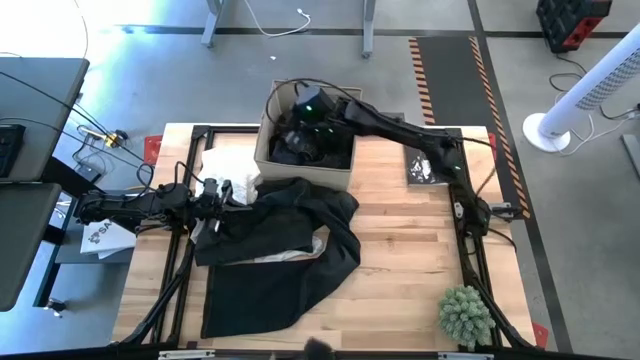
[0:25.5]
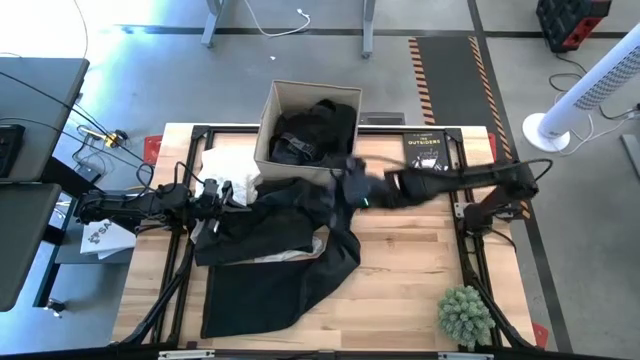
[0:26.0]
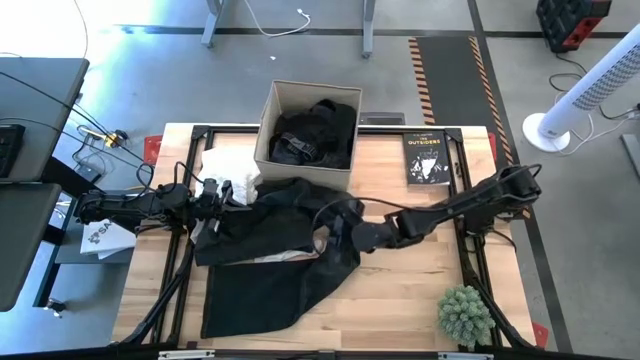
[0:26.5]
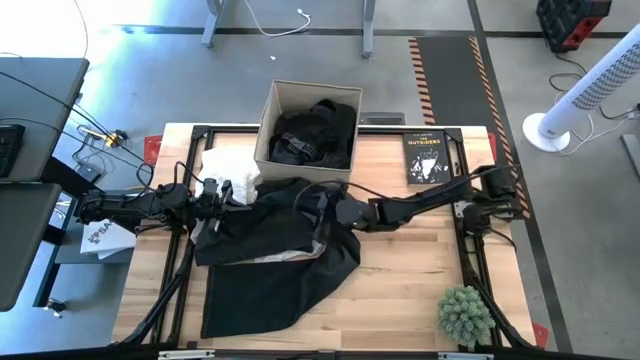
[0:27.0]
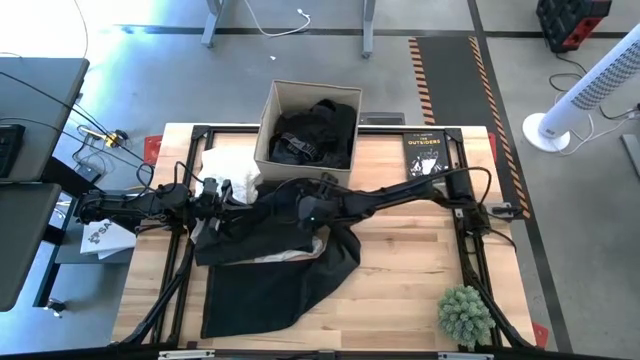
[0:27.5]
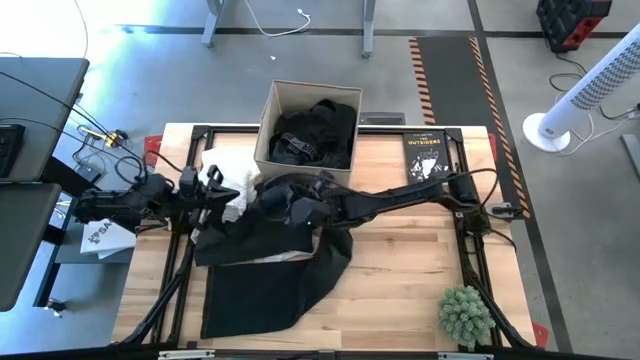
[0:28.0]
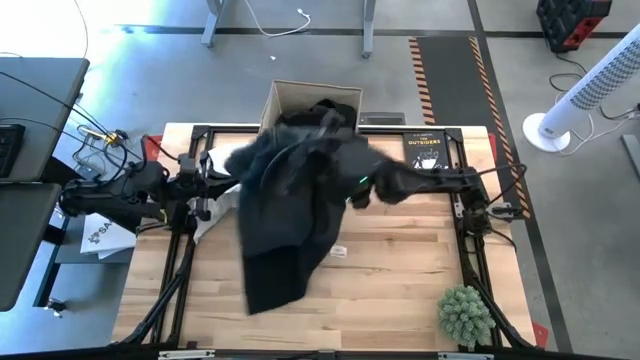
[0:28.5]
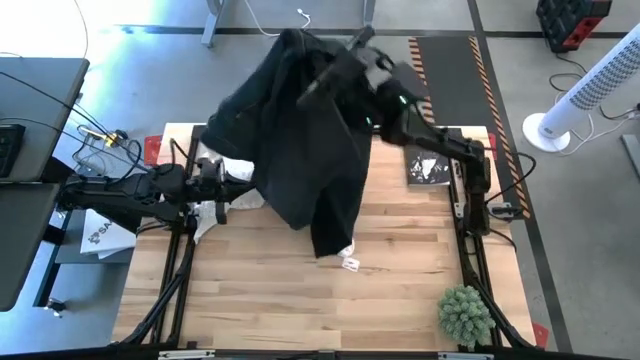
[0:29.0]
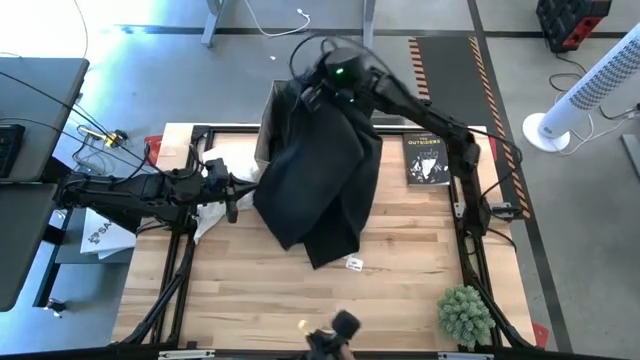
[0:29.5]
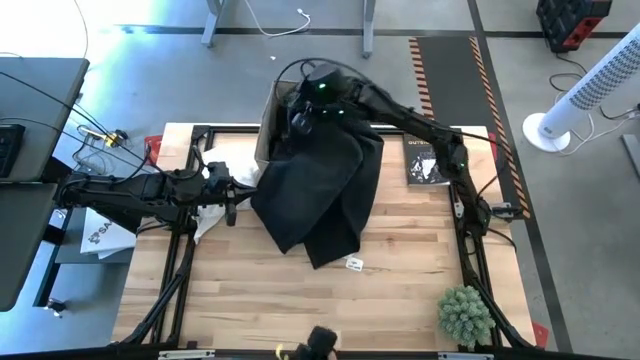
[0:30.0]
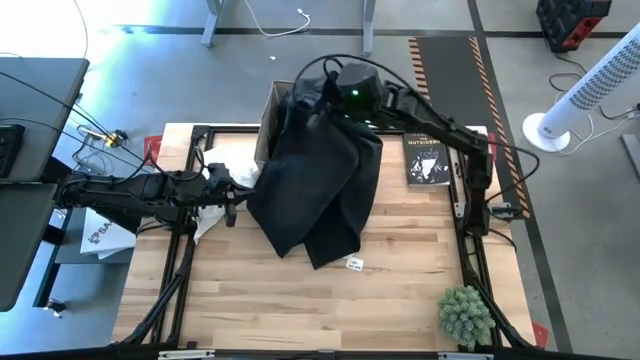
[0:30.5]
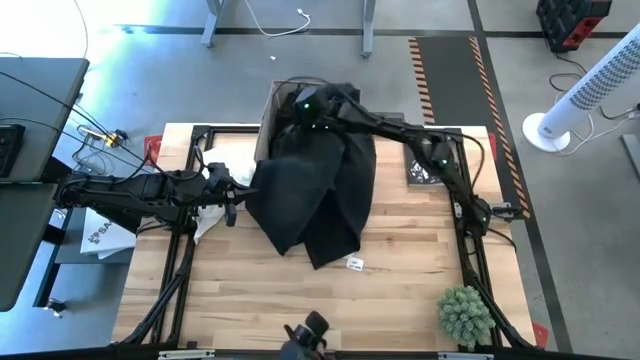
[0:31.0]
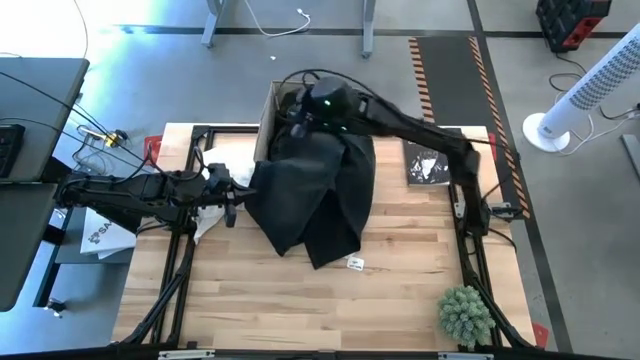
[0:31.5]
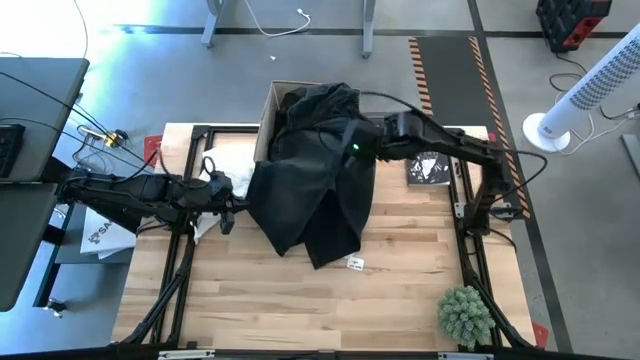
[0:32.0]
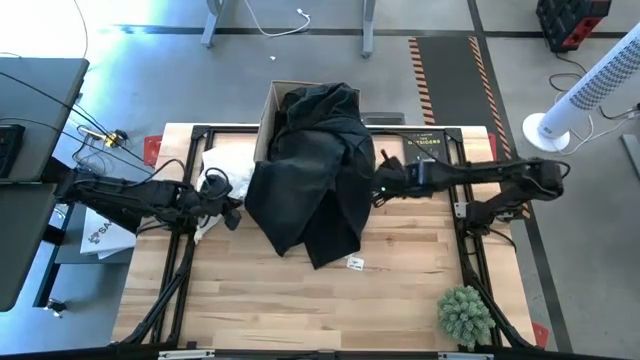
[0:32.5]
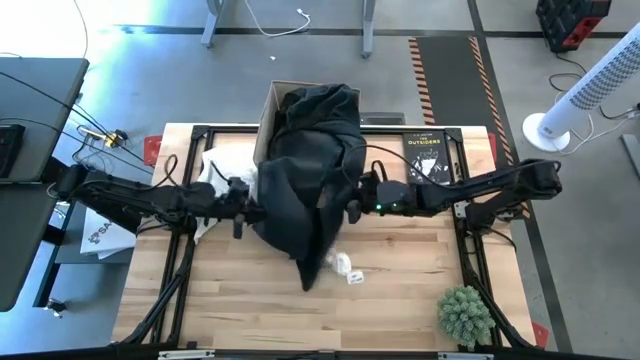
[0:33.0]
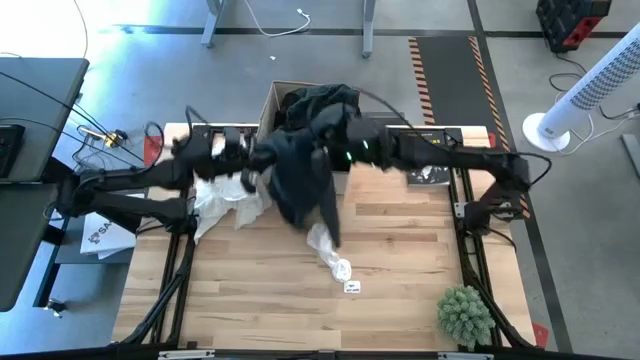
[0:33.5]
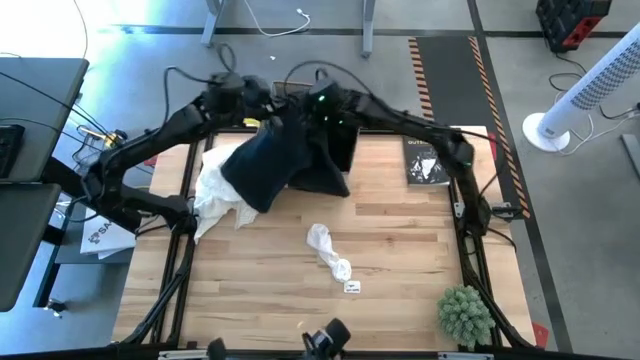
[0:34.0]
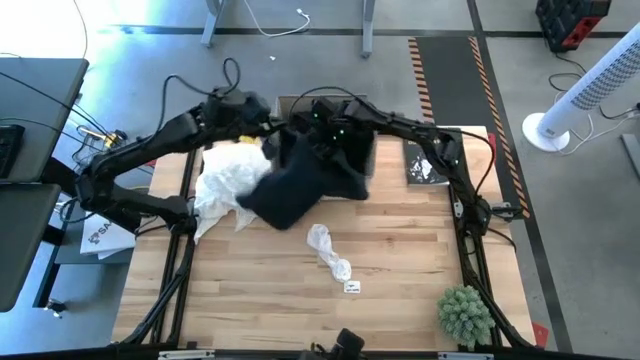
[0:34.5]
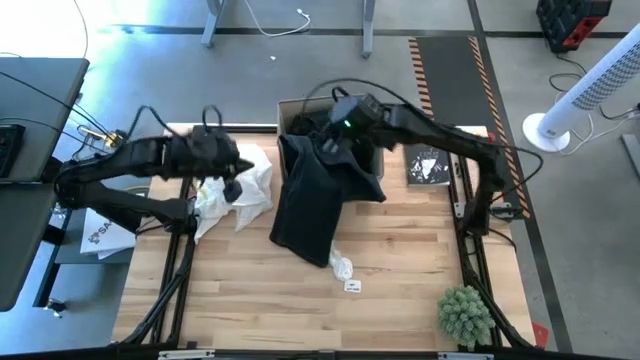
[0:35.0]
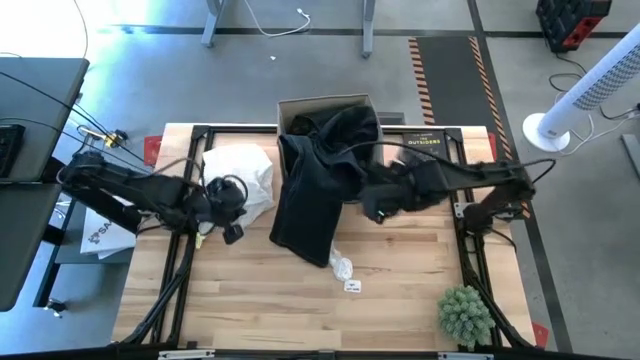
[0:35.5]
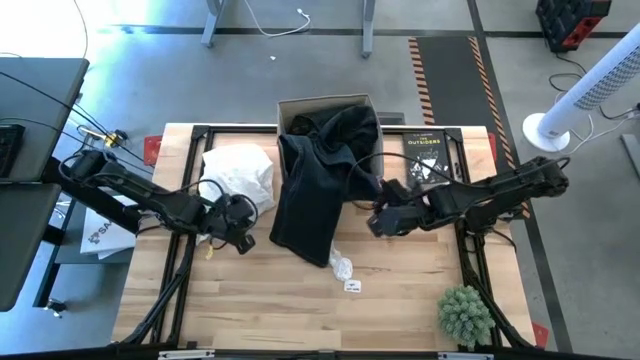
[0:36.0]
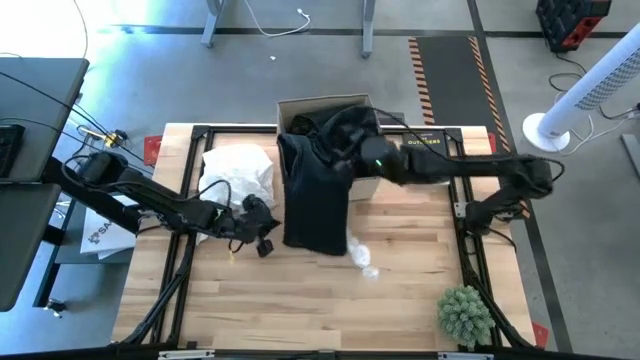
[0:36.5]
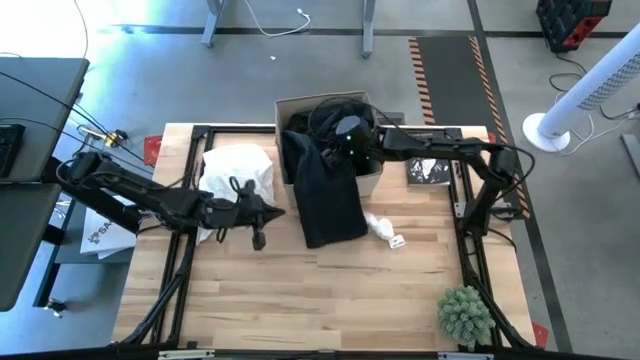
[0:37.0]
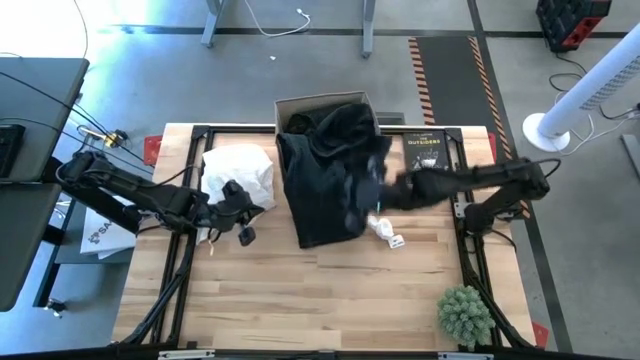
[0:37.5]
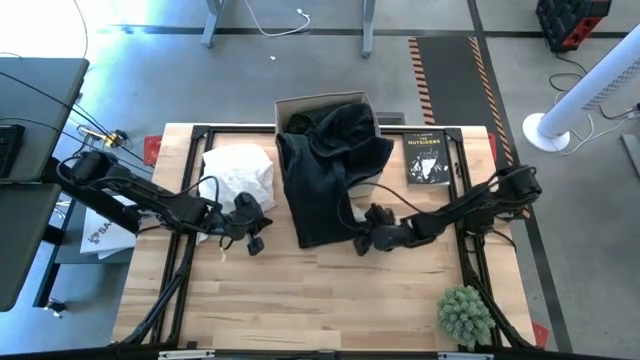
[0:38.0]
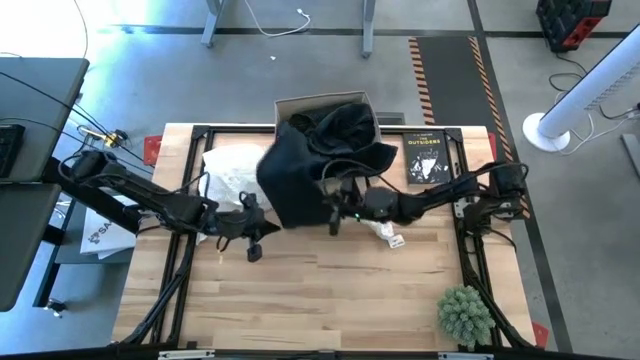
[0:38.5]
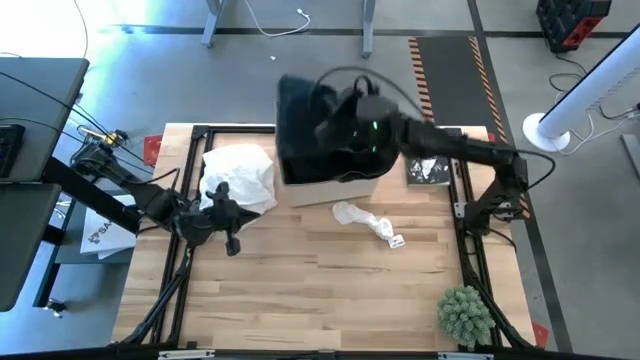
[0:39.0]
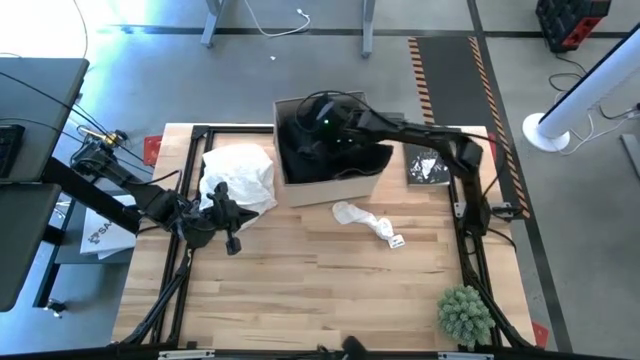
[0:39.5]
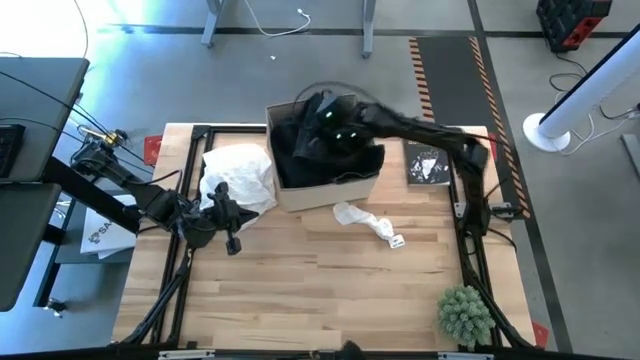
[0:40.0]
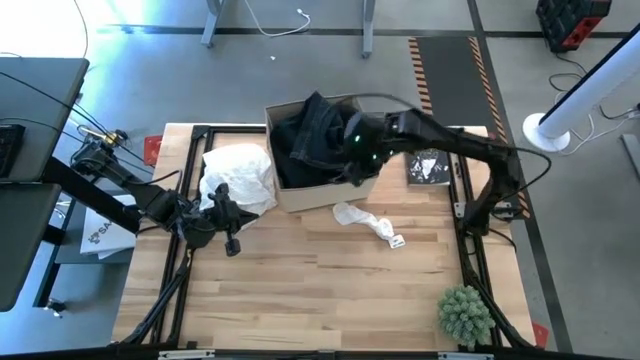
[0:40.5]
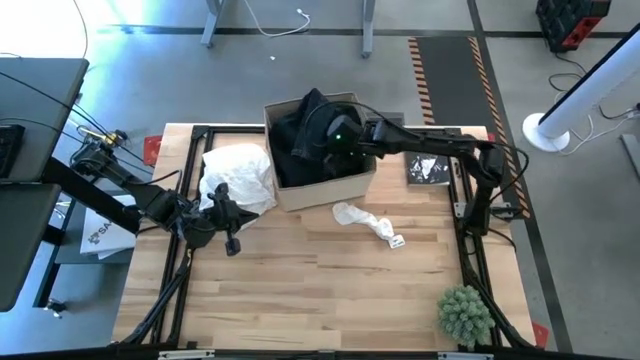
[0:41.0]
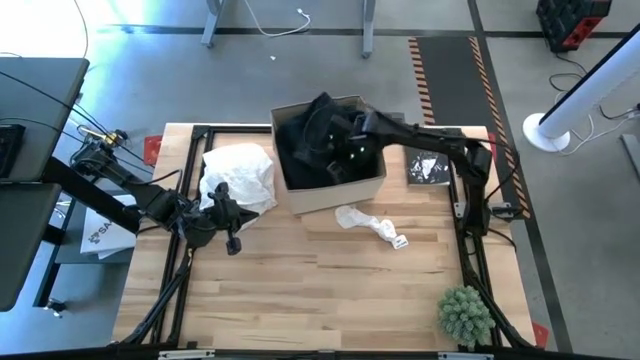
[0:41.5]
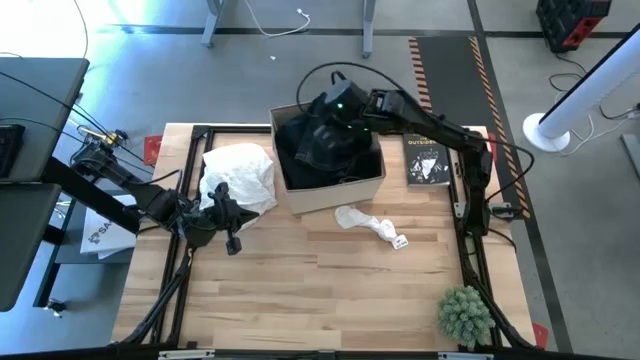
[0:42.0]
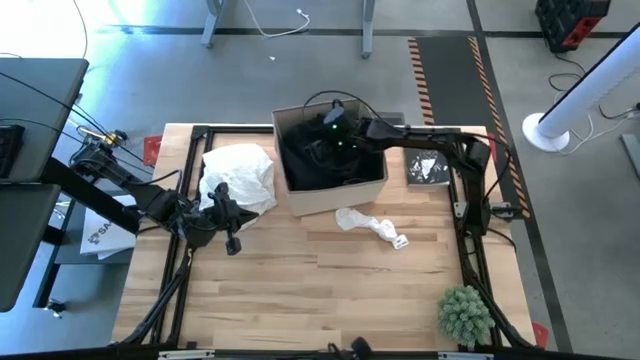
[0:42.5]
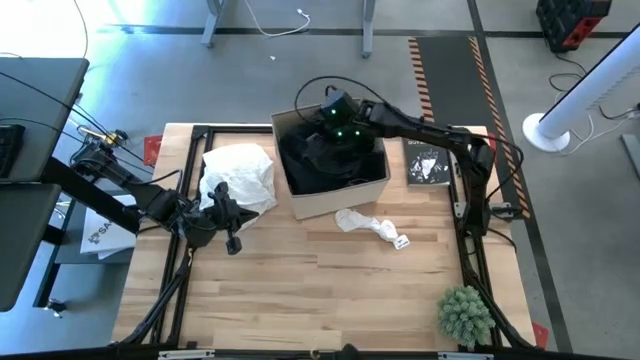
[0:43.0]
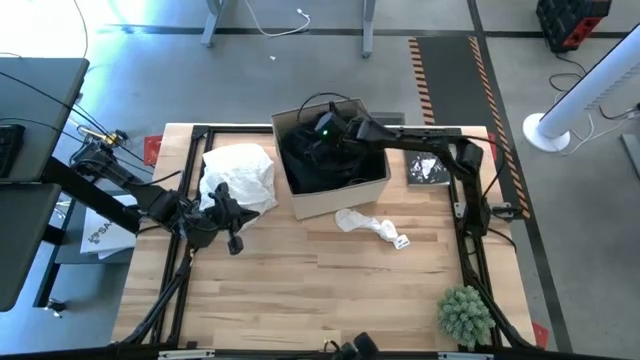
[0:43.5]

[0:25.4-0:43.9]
Task: Sort clothes
Put the blue pants into the laundry bin

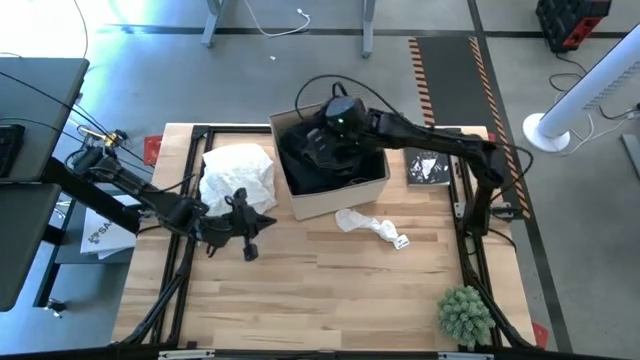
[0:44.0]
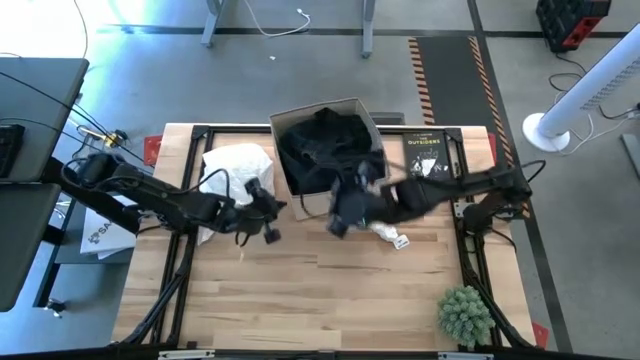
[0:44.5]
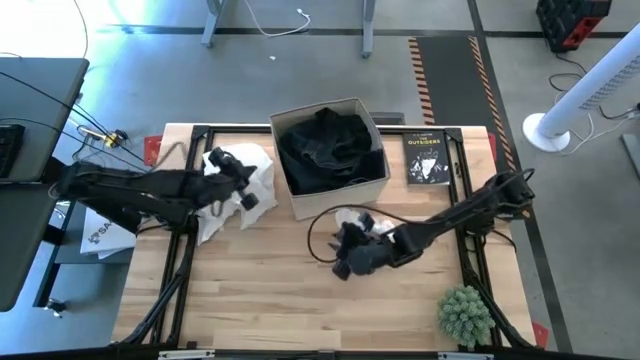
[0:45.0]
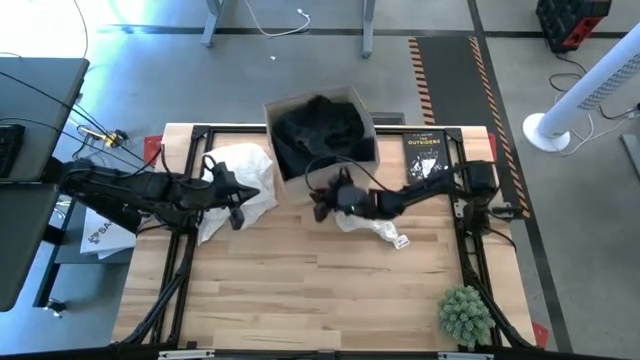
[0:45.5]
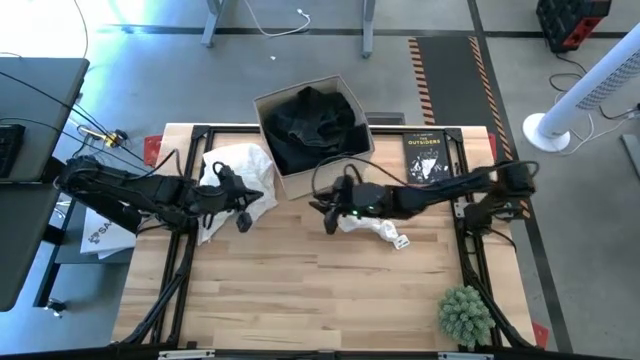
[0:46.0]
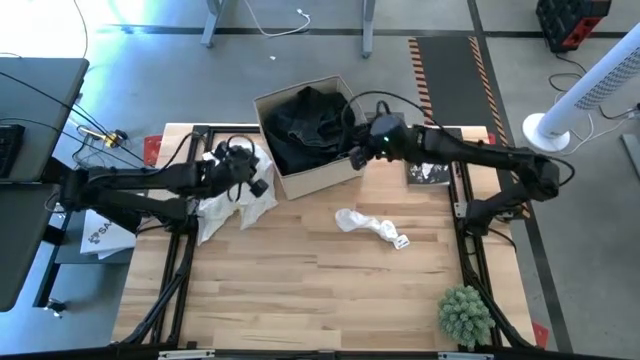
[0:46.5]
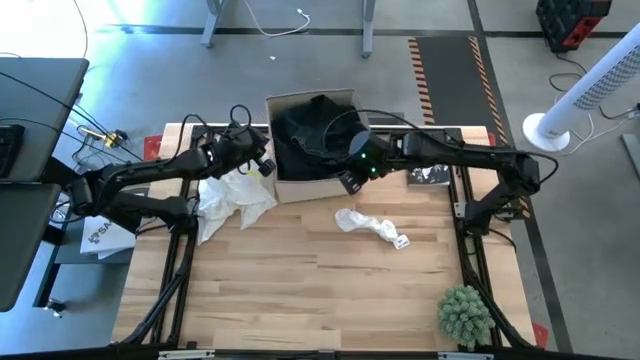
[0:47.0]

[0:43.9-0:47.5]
Move the laundry bin to the top
